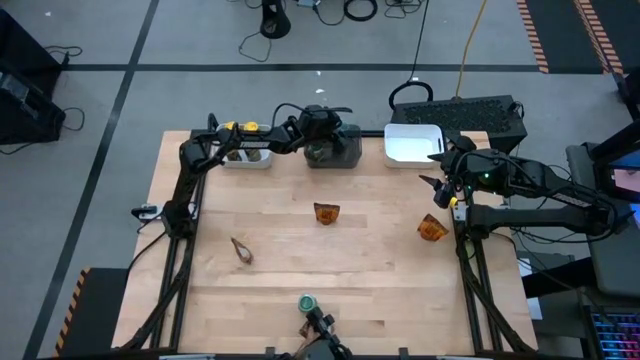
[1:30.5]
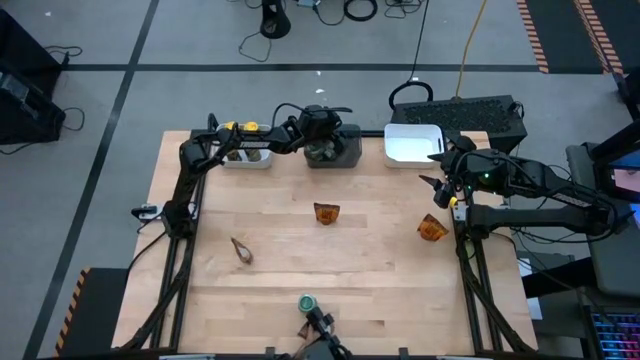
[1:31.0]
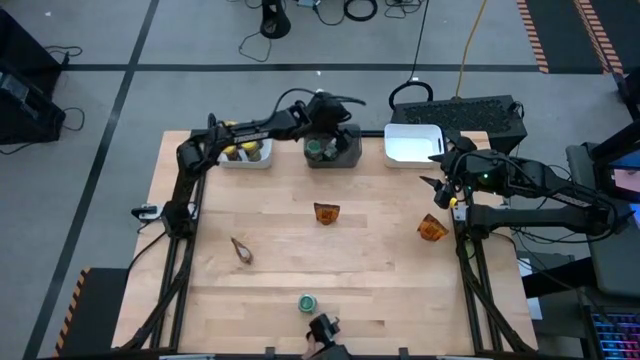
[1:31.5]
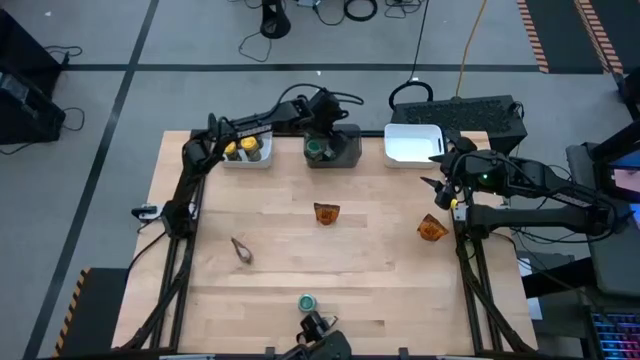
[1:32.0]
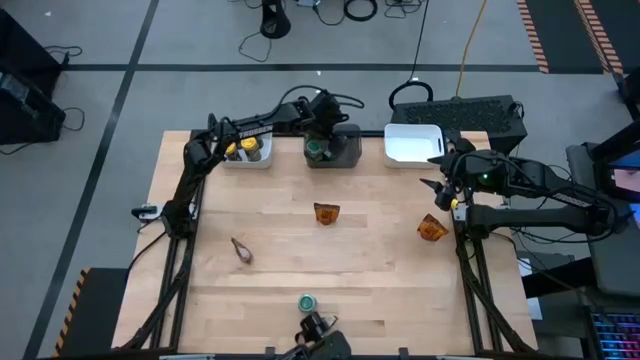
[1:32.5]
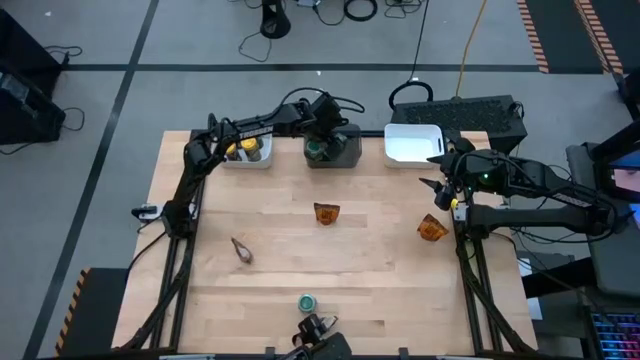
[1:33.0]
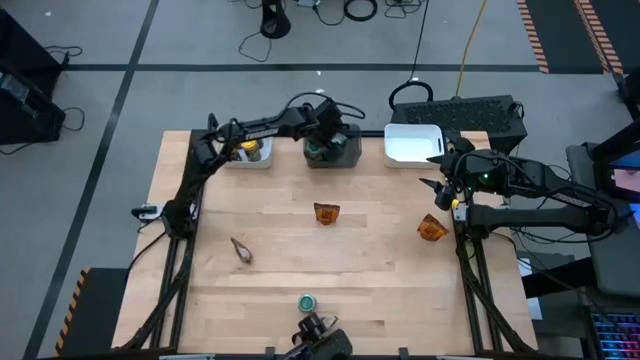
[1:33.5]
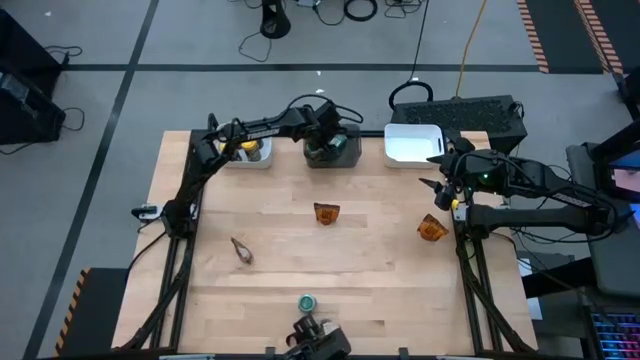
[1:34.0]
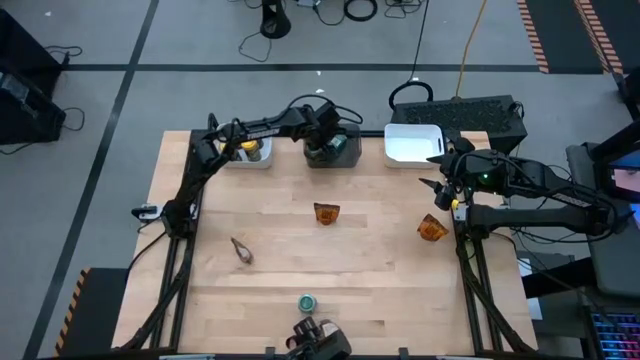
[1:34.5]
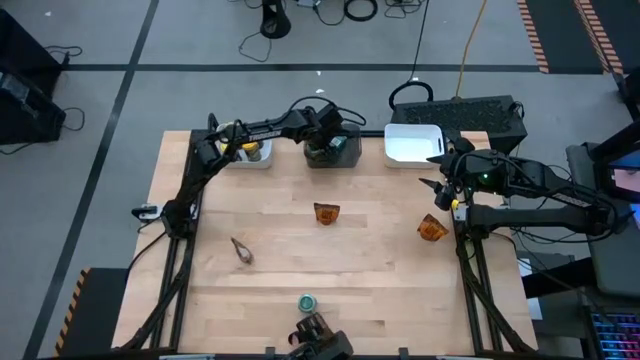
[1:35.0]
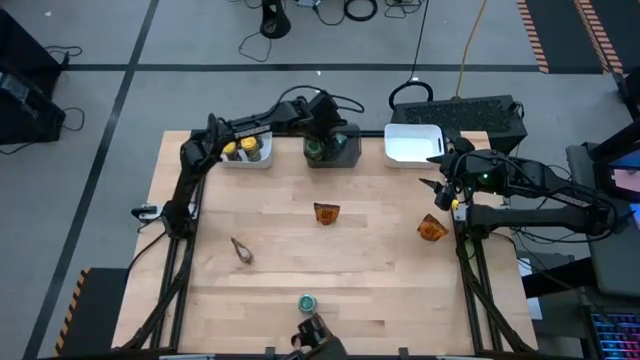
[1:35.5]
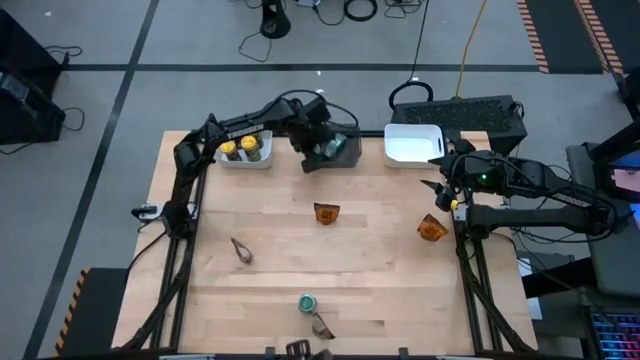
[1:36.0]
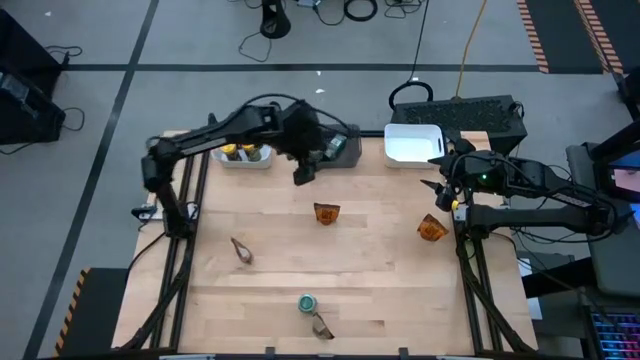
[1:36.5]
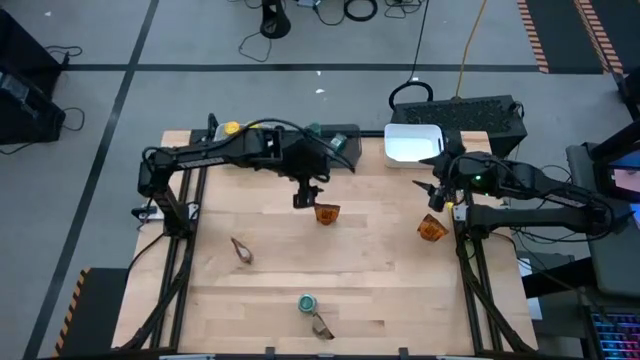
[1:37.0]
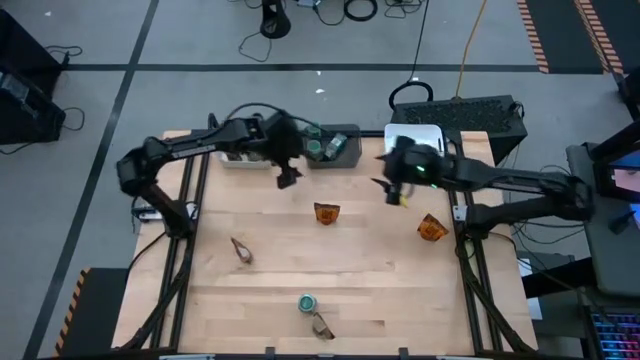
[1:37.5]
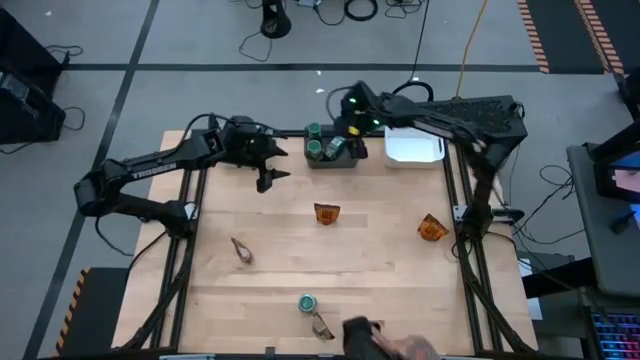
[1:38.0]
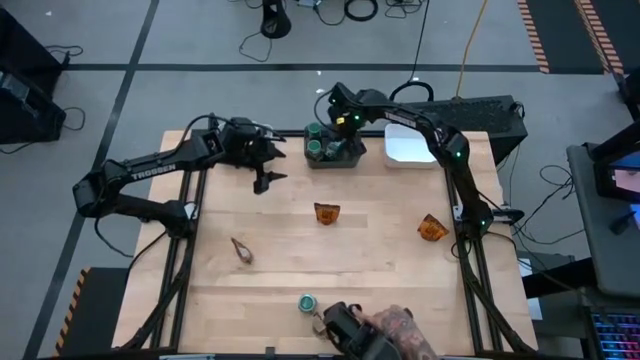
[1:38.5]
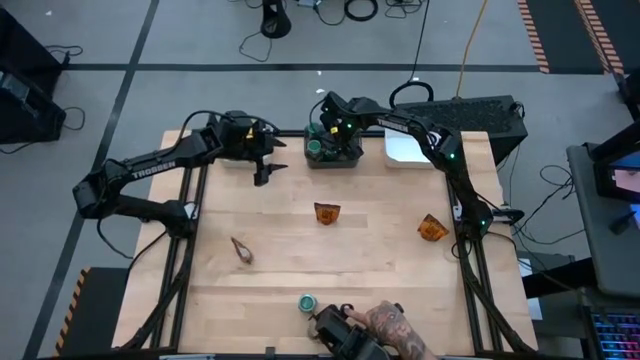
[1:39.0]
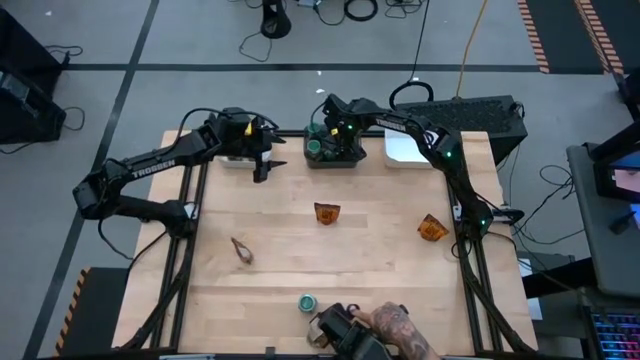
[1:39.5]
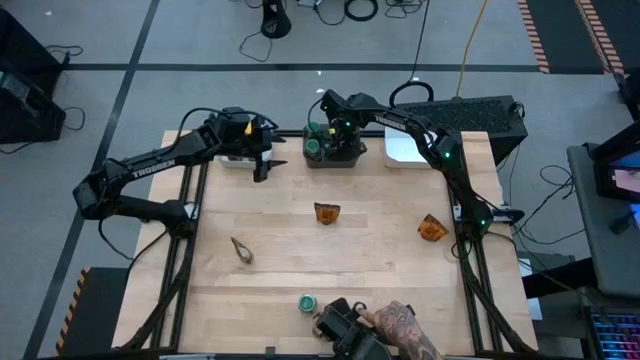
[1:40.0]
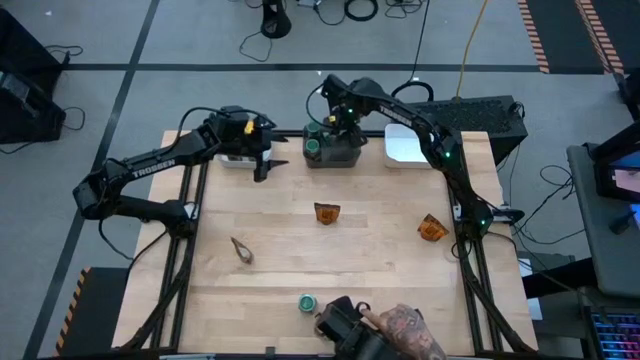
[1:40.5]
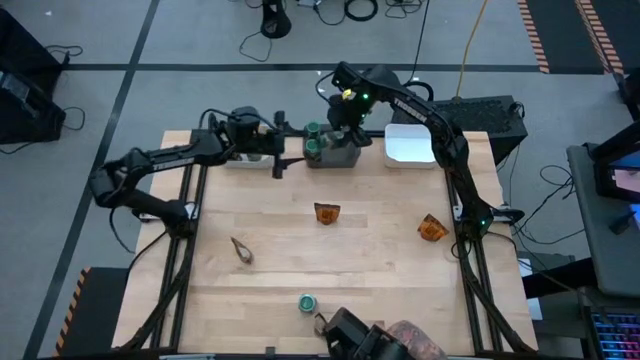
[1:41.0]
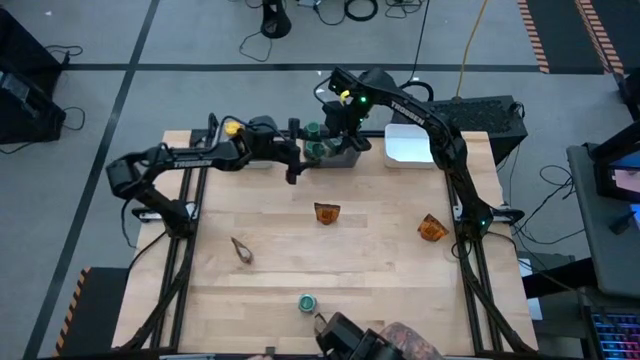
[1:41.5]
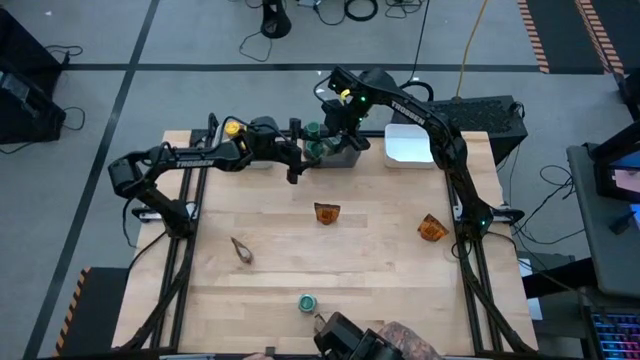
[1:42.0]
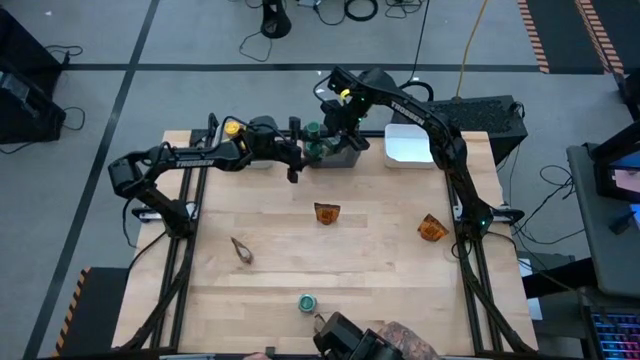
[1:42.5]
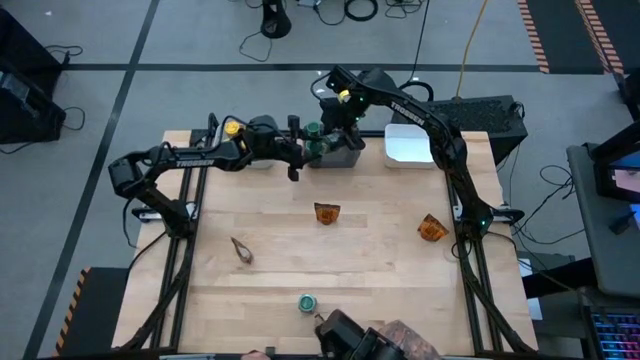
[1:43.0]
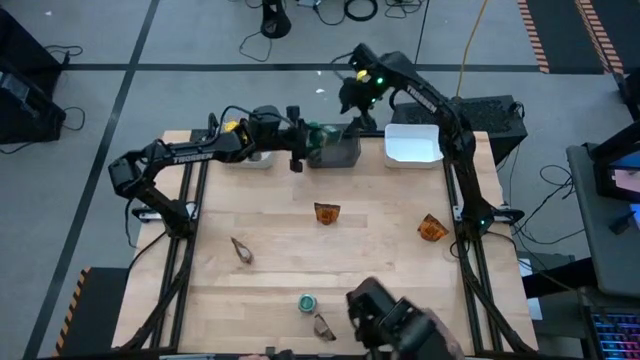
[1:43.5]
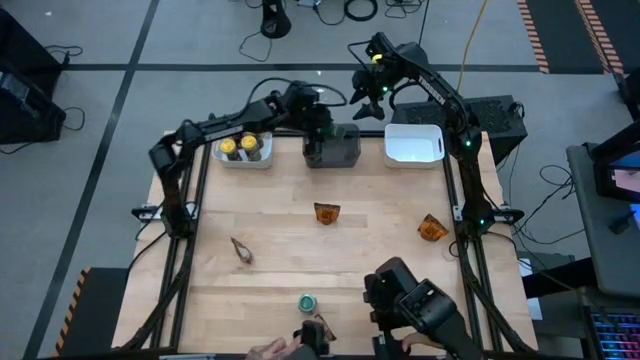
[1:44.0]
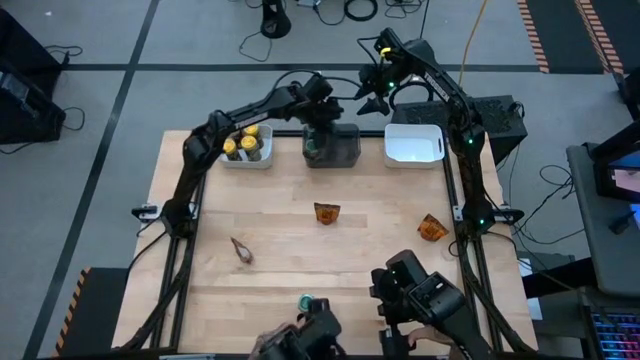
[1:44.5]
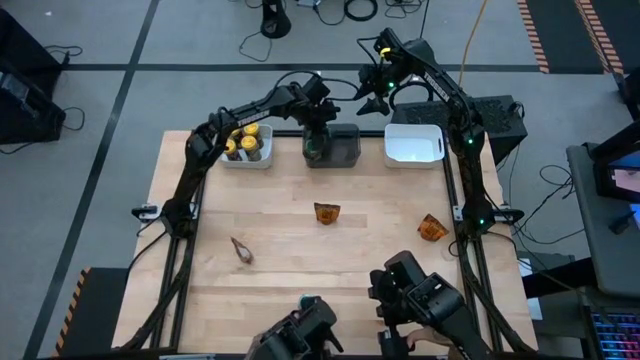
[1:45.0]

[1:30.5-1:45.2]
Task: Sort spices by type
Put the top green seasoning bottle into the black bin

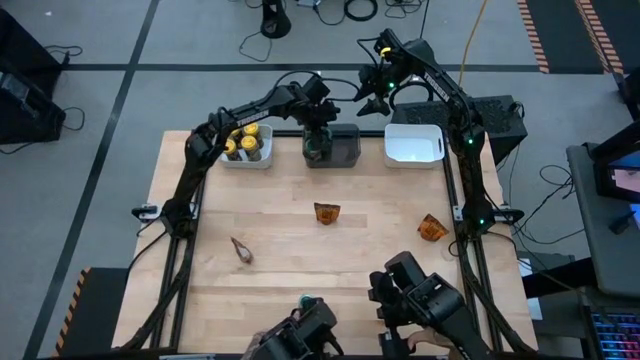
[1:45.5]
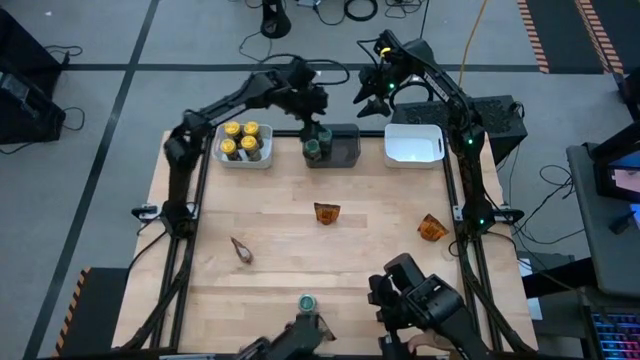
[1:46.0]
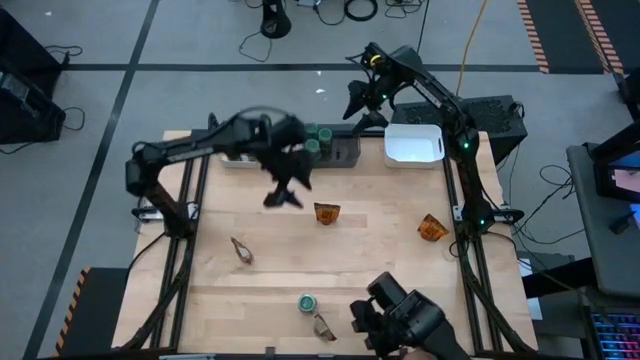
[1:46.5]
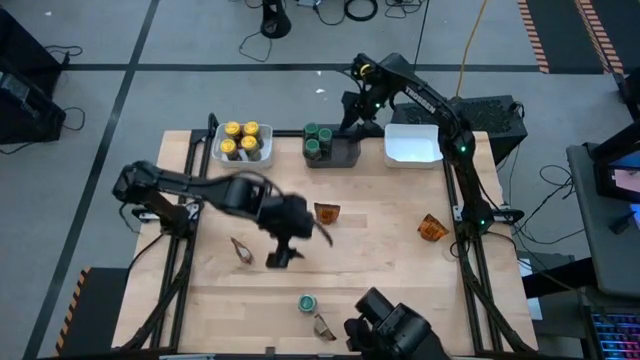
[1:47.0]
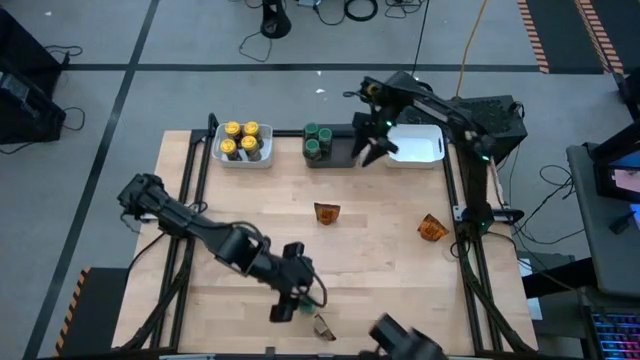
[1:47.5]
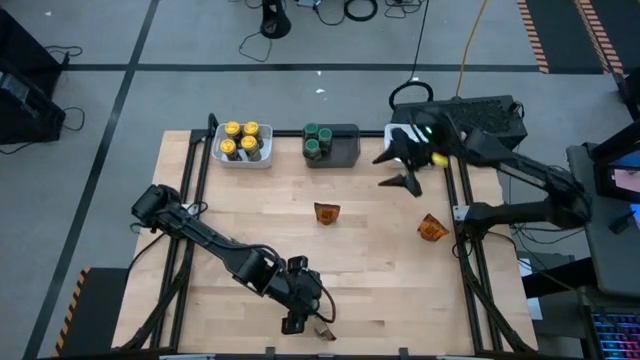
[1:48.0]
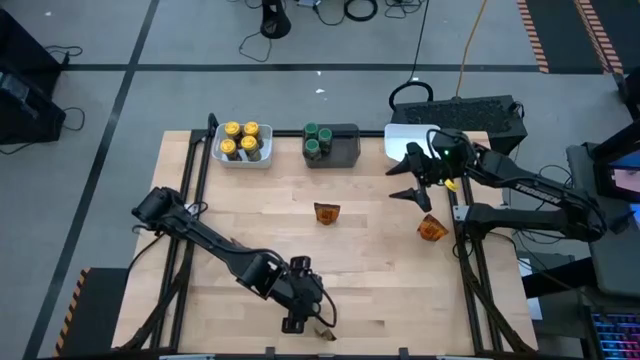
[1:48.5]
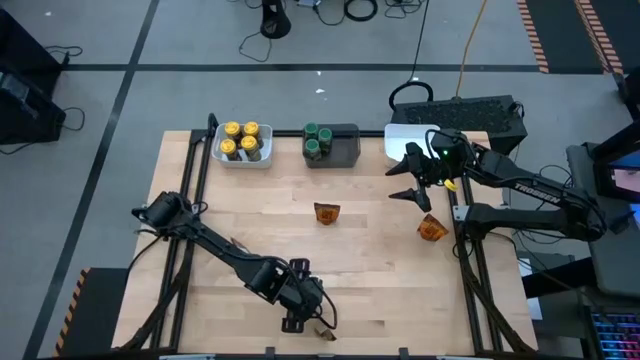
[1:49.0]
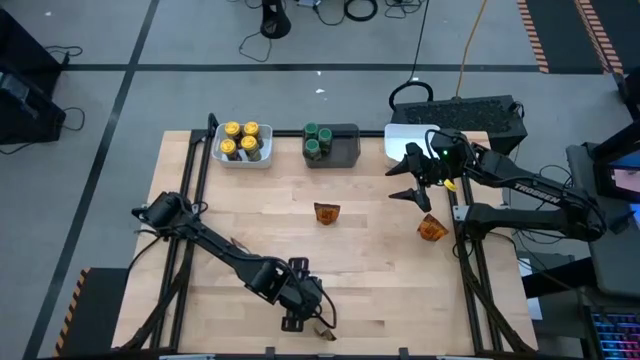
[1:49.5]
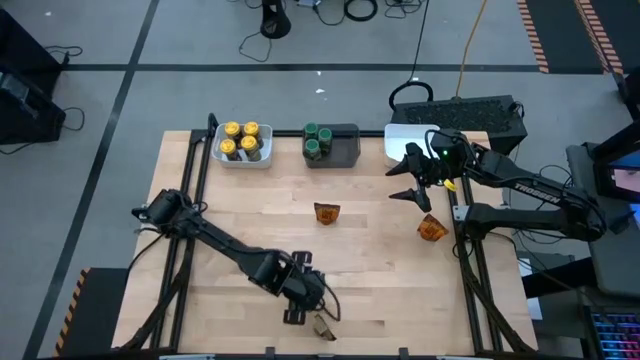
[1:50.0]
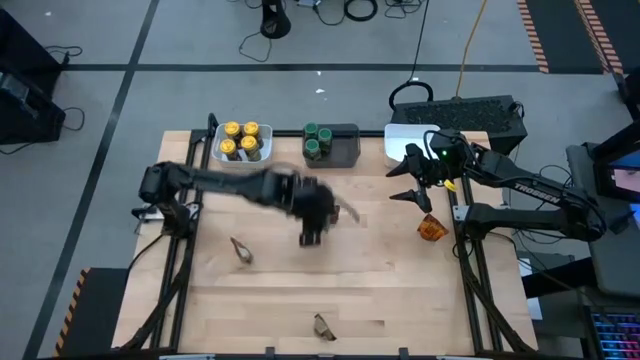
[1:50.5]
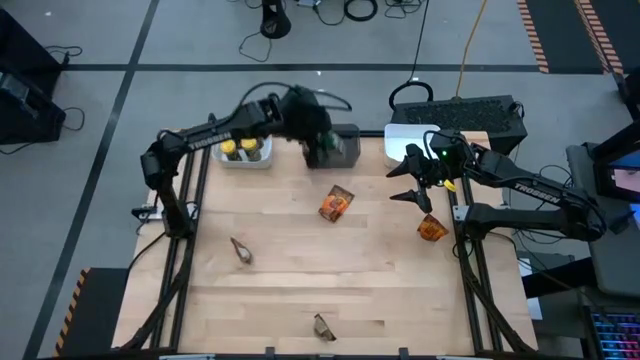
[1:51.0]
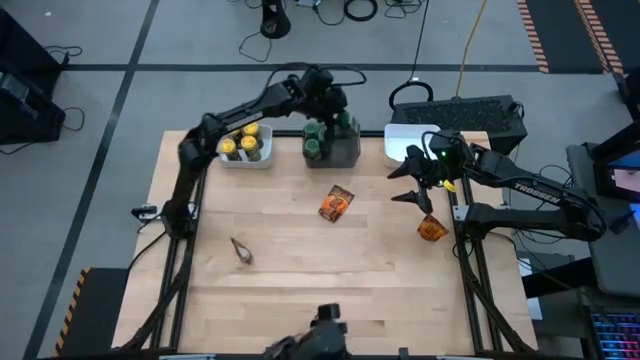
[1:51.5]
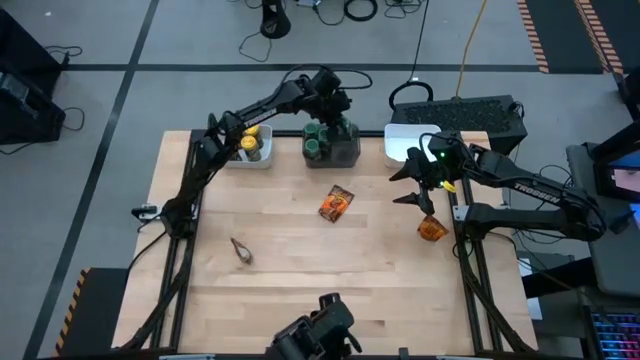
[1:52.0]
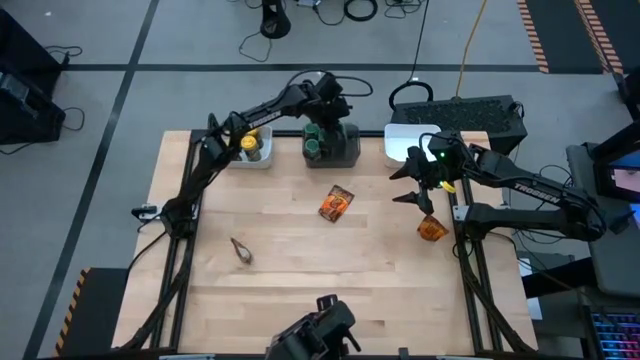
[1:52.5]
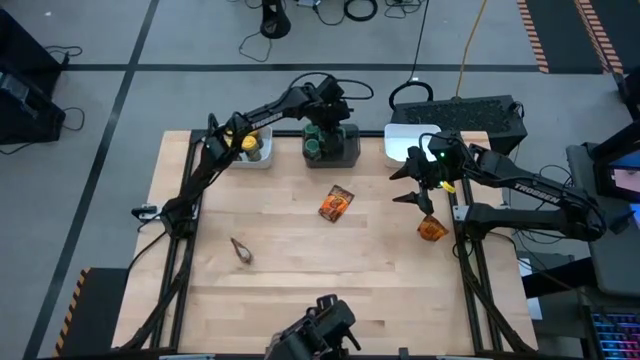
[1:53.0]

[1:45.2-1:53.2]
Put the green seasoning bottle into the black bin
